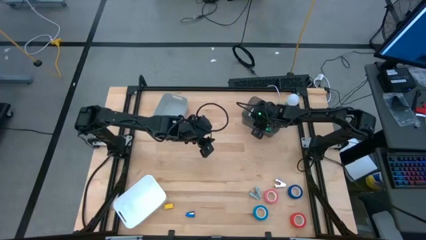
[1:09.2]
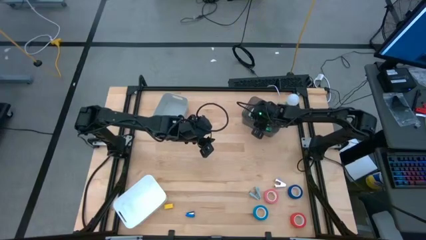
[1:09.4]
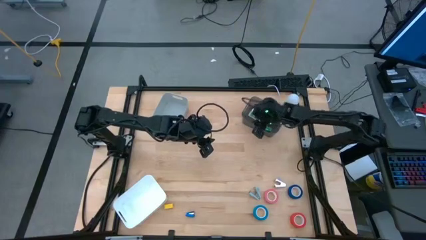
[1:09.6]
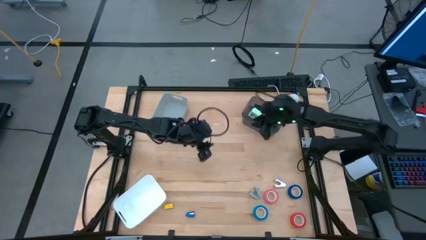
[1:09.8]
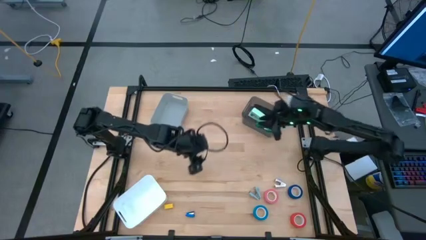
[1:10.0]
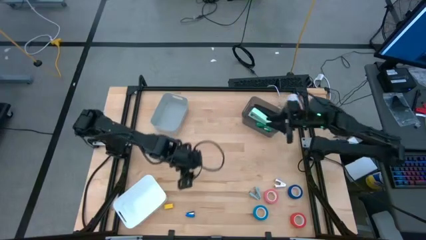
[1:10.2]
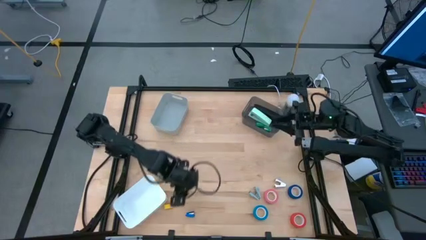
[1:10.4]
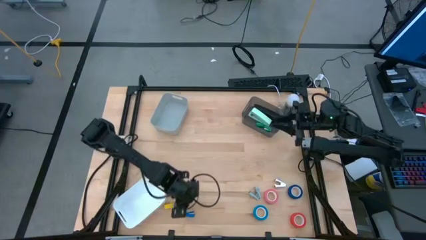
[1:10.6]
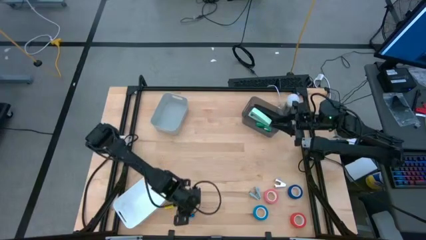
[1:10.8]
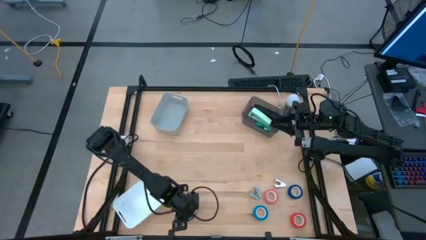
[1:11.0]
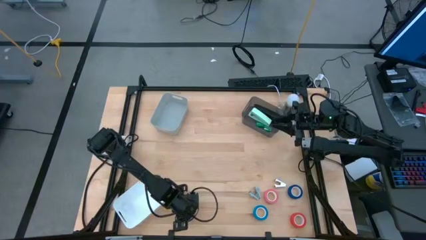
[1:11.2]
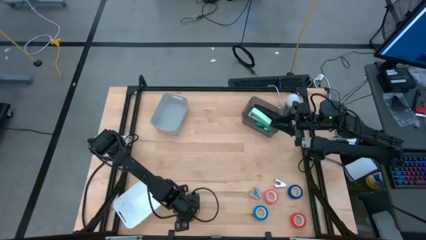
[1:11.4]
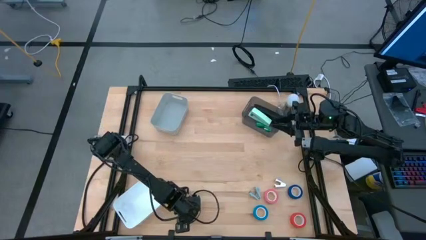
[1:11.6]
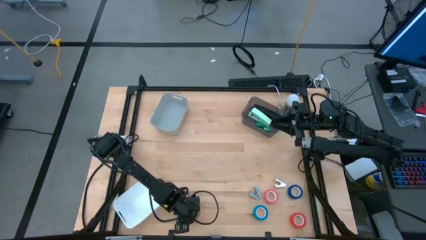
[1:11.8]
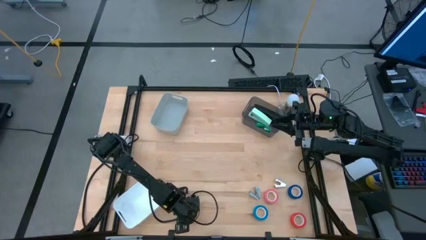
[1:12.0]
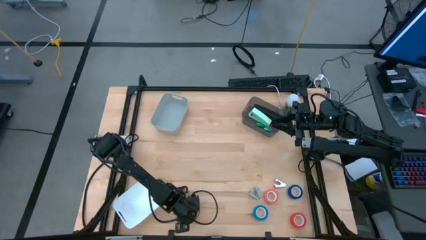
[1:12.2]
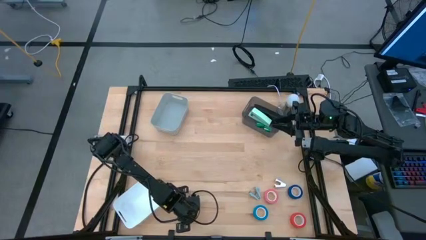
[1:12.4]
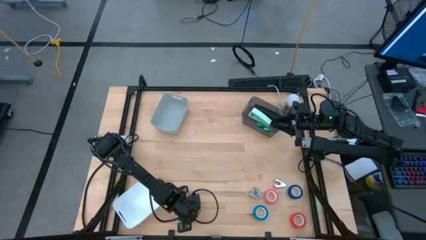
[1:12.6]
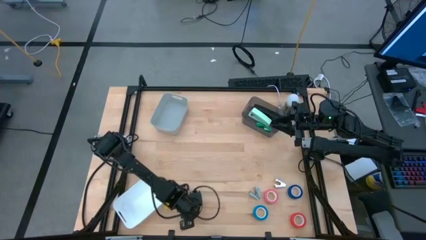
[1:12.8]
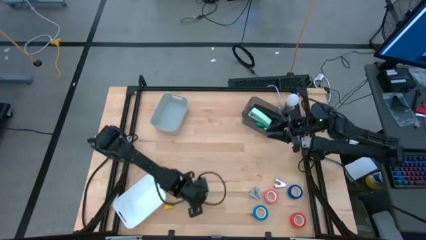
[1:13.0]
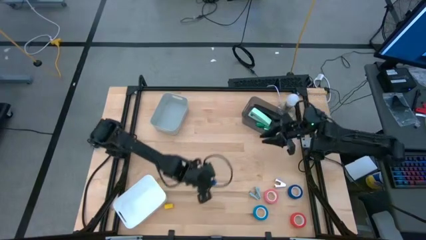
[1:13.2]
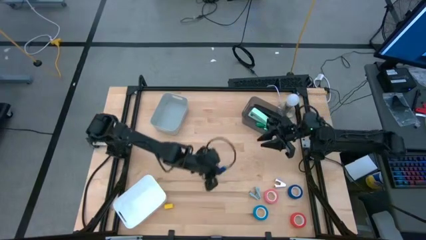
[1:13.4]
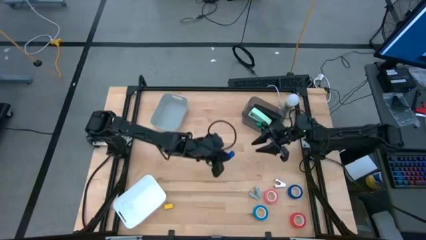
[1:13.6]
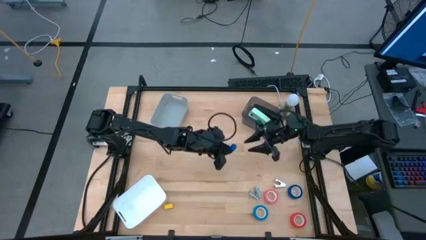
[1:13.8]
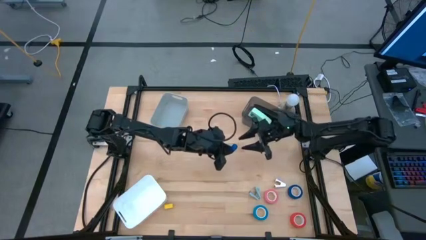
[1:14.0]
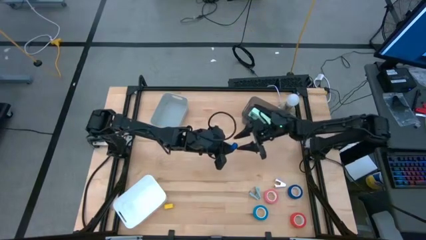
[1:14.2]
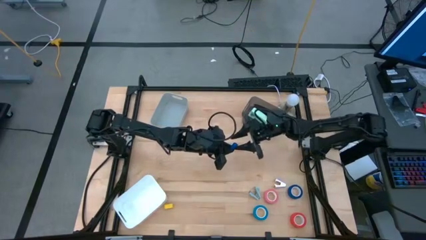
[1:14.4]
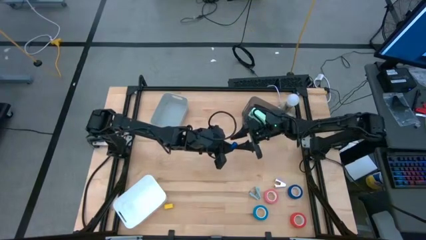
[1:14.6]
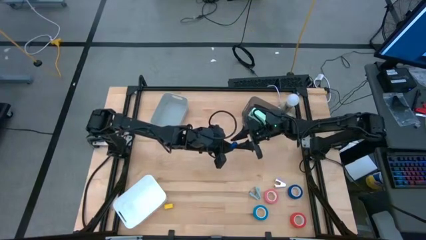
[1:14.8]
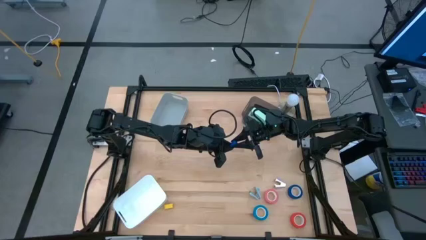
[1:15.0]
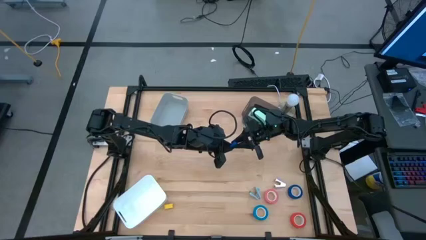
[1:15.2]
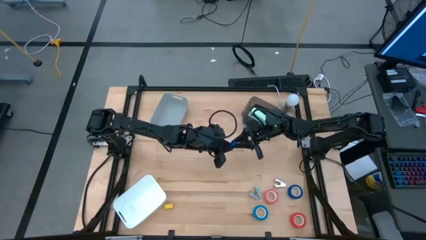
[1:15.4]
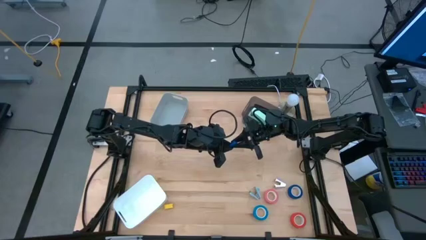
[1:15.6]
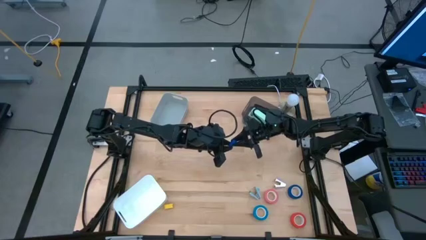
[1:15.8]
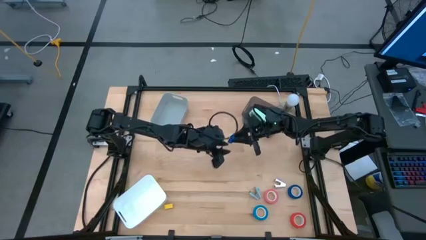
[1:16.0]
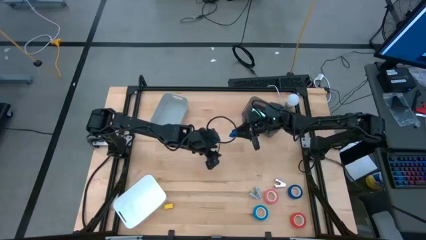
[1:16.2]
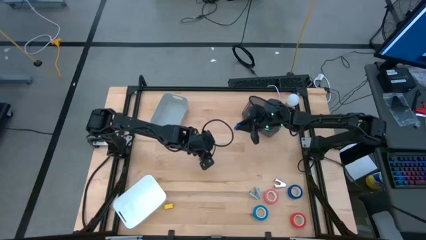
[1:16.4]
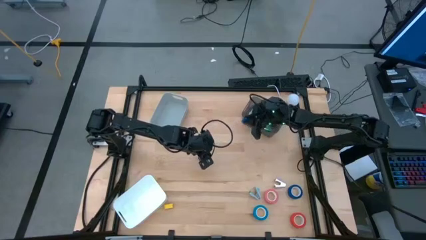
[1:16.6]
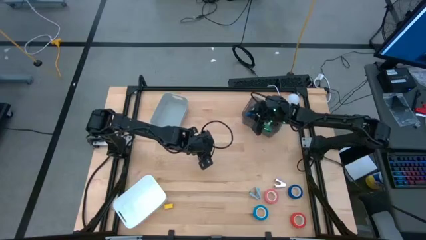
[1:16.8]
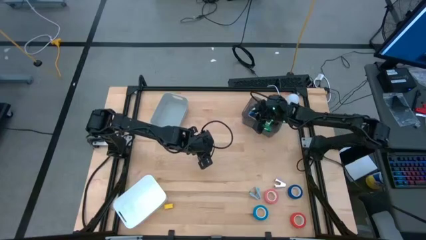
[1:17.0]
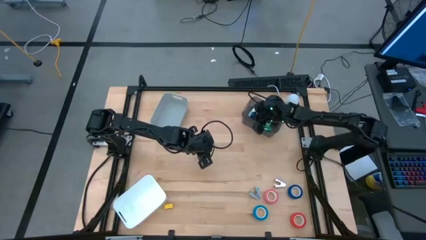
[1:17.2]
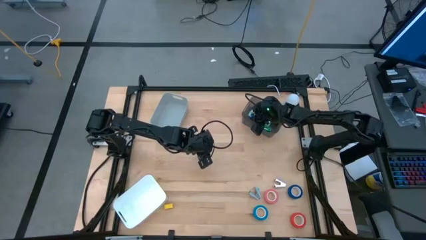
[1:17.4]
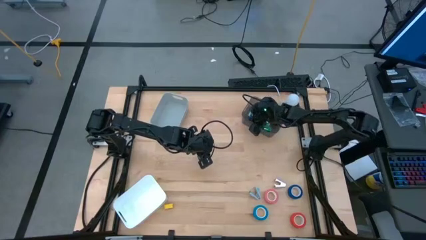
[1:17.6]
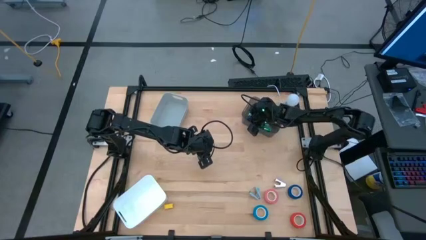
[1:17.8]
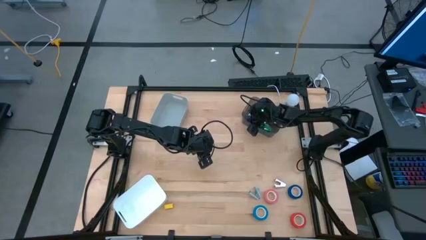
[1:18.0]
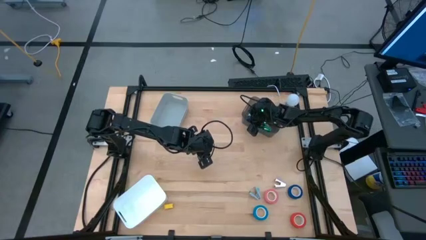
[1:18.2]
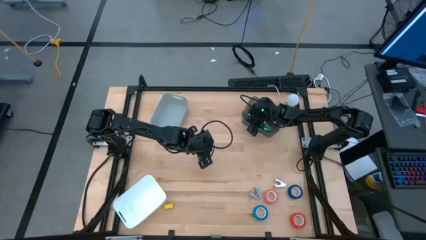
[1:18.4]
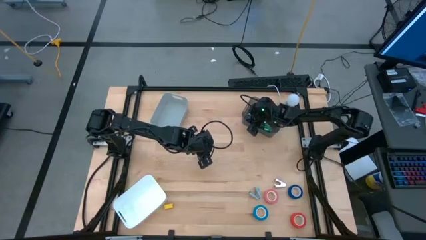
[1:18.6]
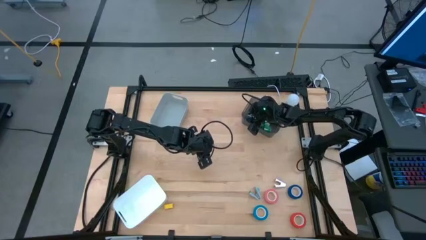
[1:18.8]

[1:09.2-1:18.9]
Task: Pick and place Stapler, Stapler remover, tape
Put the blue stapler into the black bin

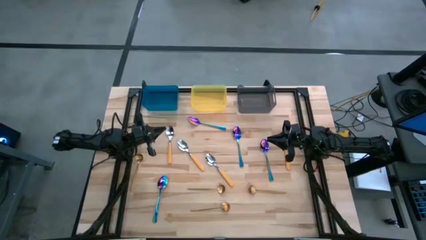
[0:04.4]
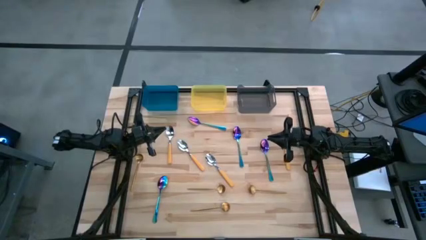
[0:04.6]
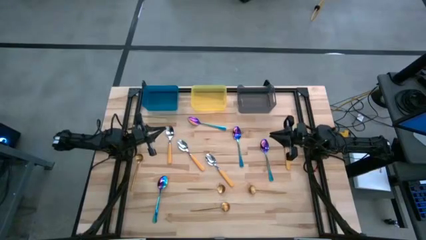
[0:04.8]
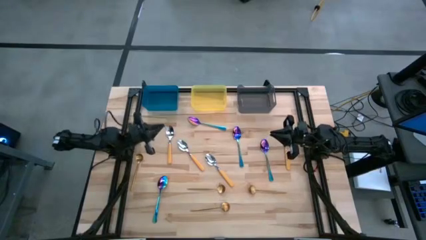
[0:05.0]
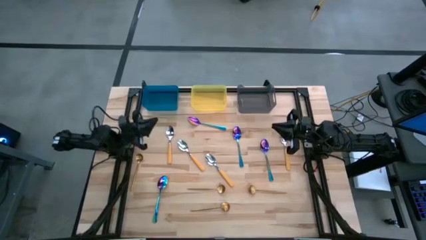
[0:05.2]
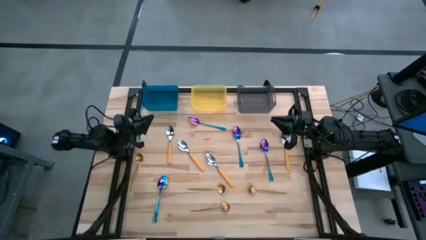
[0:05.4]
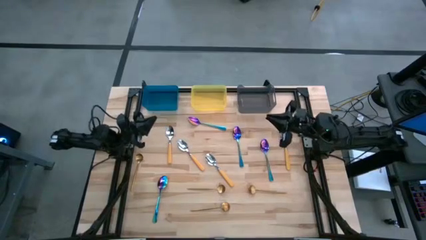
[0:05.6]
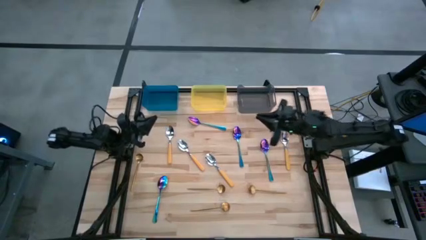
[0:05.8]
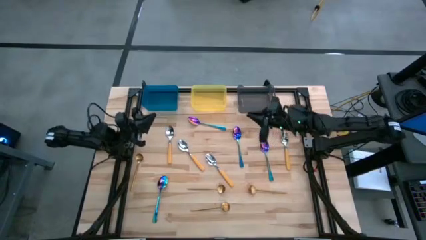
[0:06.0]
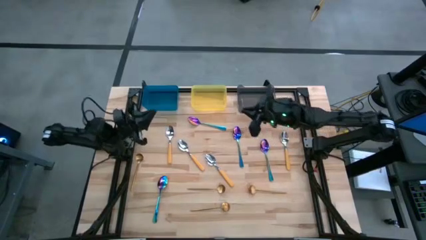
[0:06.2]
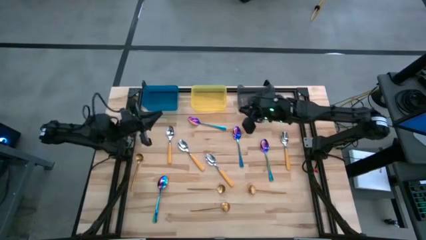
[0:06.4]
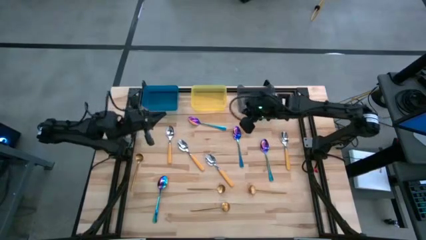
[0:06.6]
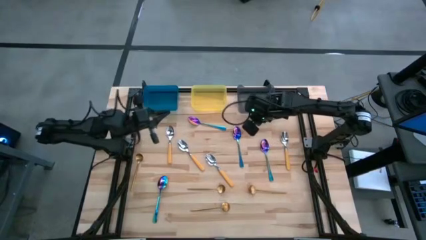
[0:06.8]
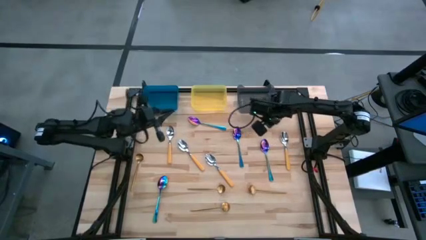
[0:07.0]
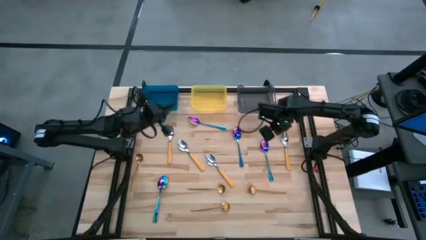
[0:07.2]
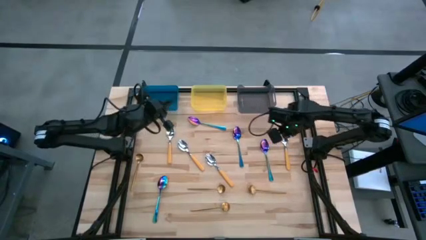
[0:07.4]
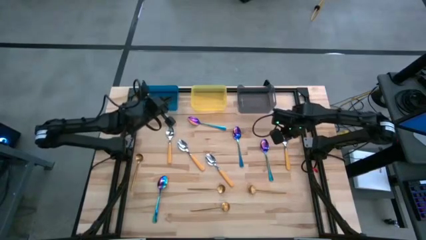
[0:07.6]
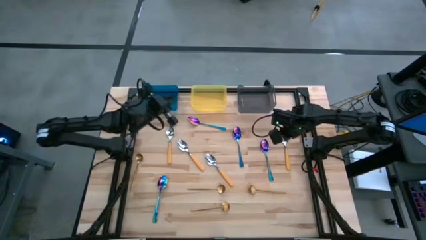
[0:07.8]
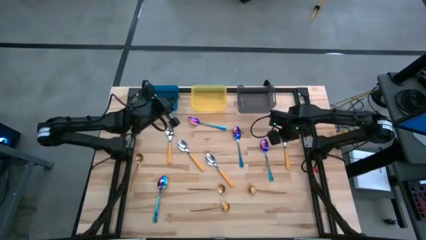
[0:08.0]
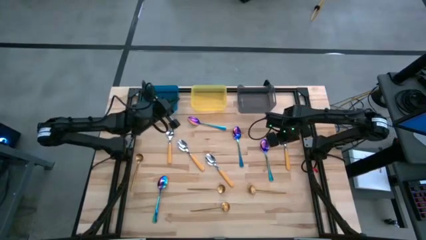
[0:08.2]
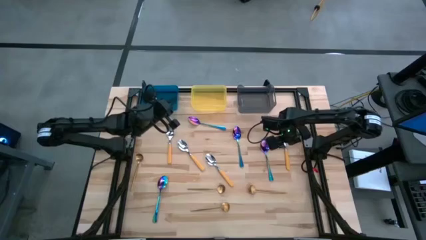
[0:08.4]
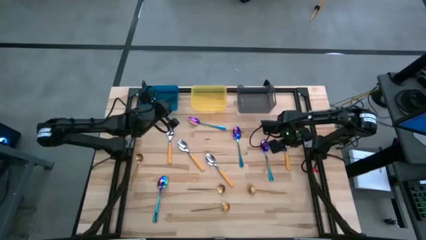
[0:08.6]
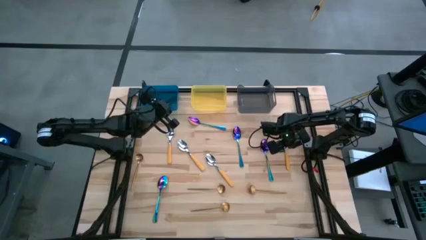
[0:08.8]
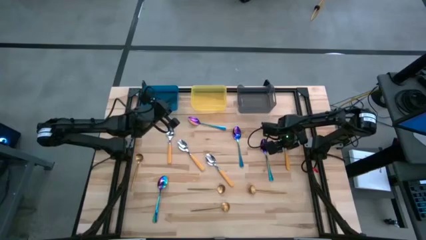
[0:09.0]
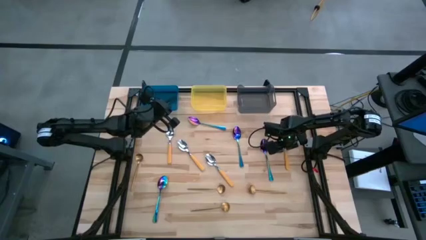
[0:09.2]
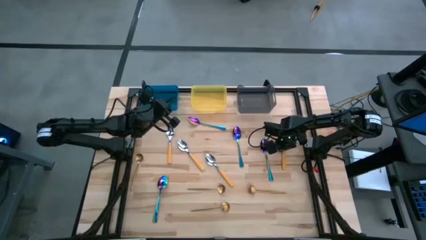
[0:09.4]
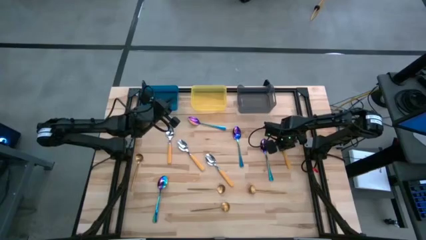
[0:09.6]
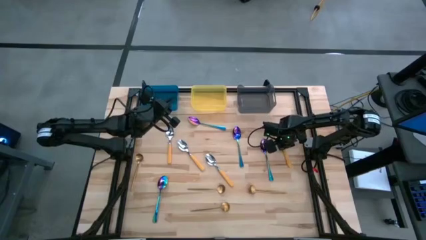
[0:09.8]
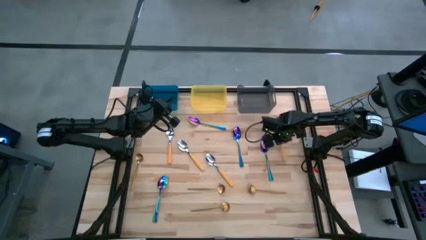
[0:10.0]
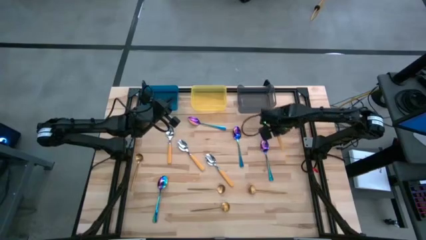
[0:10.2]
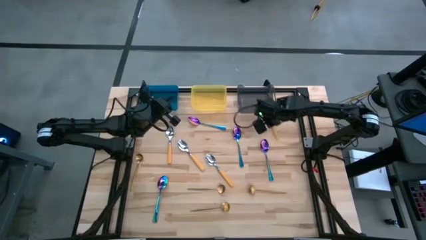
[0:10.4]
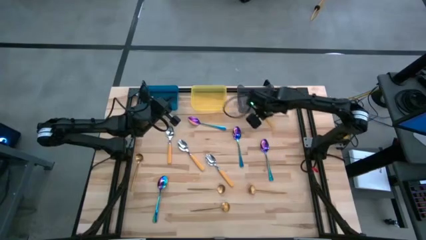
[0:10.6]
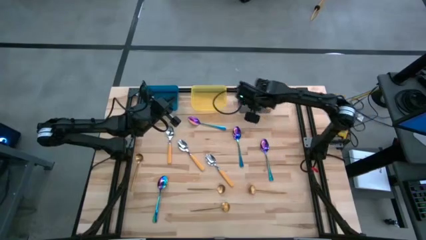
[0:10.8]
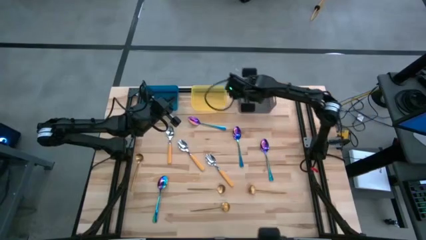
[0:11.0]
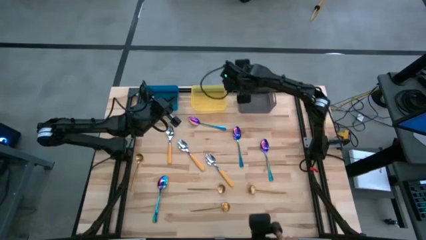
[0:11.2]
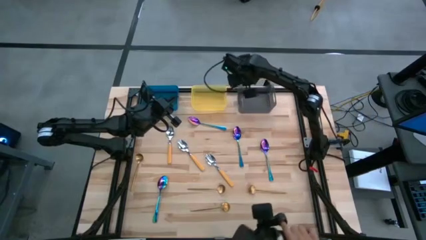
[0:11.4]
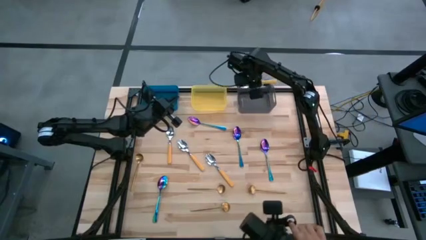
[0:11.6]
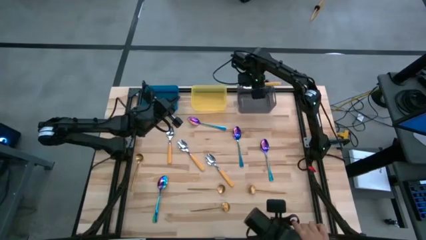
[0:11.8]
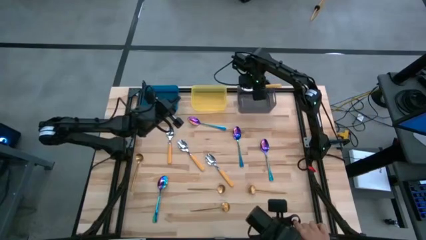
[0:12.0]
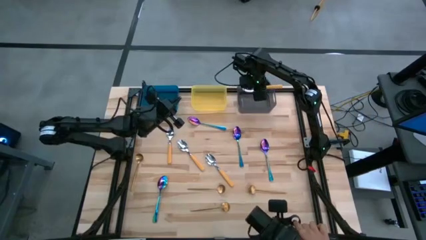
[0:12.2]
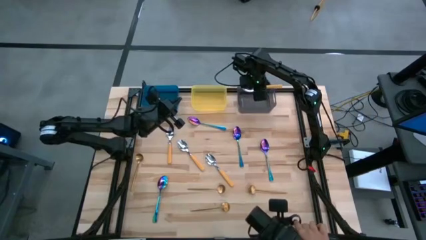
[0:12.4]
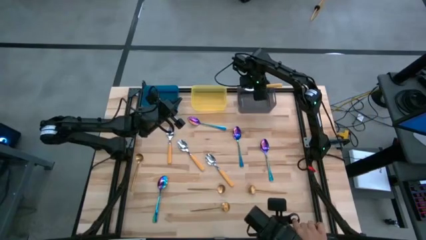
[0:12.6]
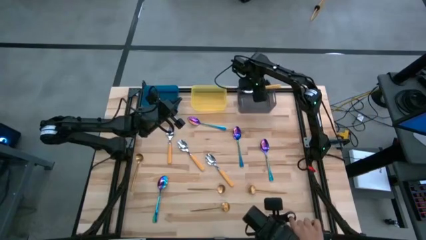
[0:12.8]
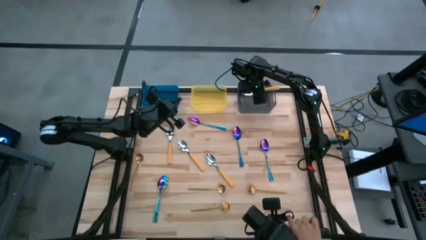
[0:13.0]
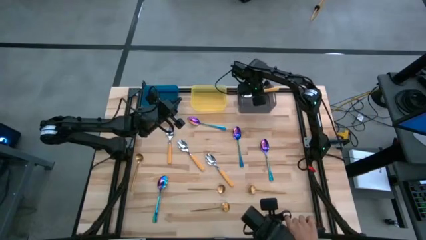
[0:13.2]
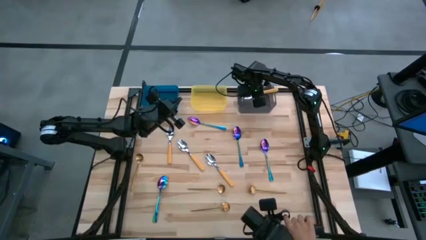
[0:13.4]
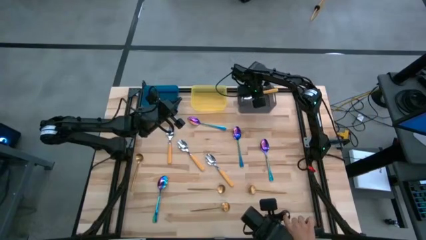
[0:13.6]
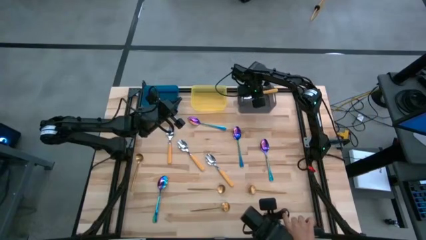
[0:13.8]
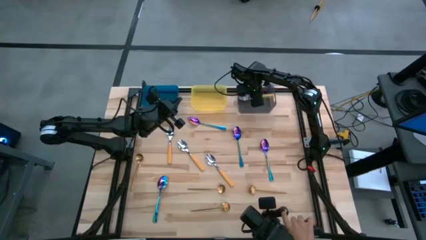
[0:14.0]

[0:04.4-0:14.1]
Task: Sort silverware by color (type)
Put the yellow spoon into the black bin
